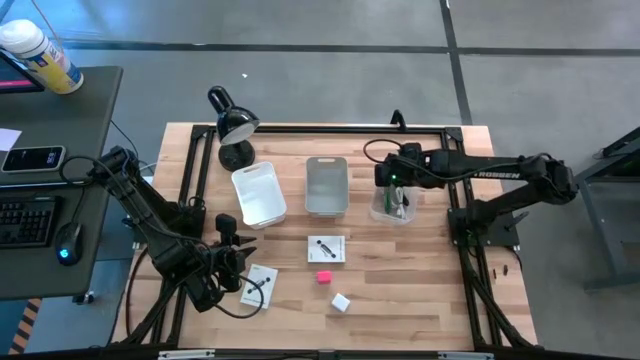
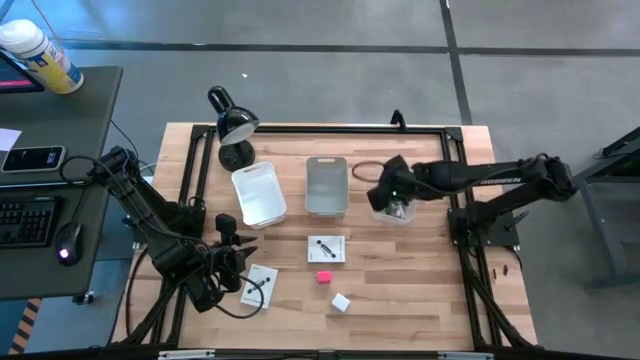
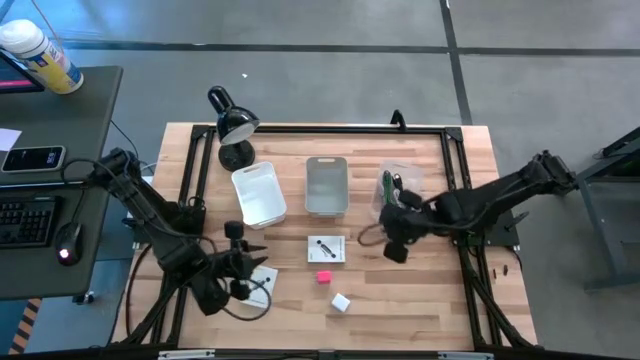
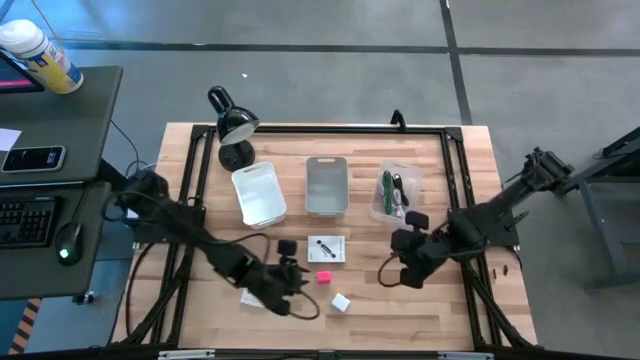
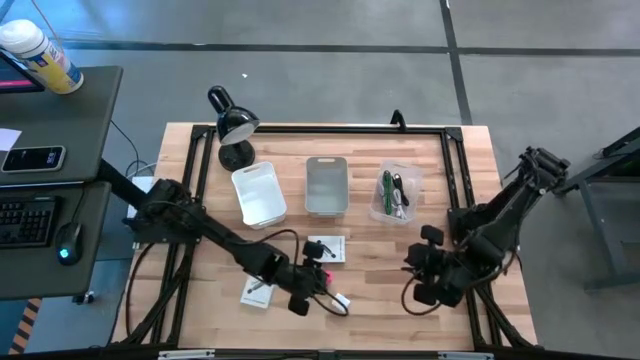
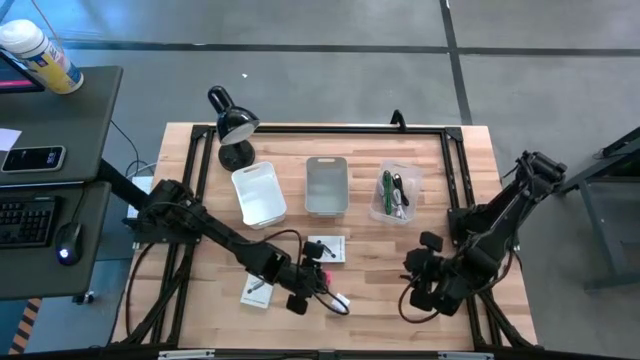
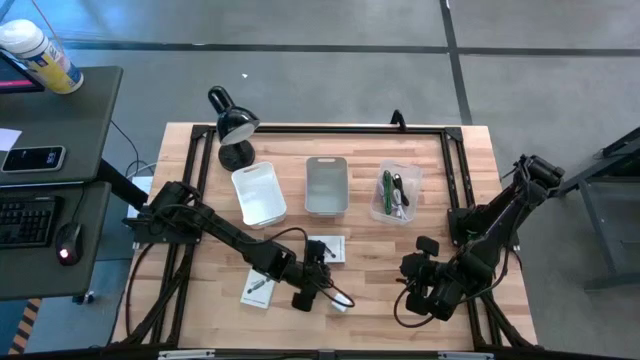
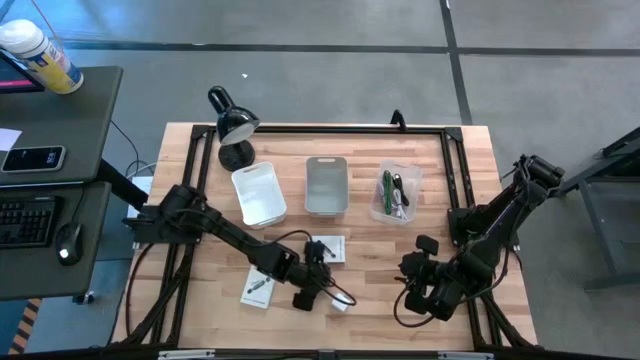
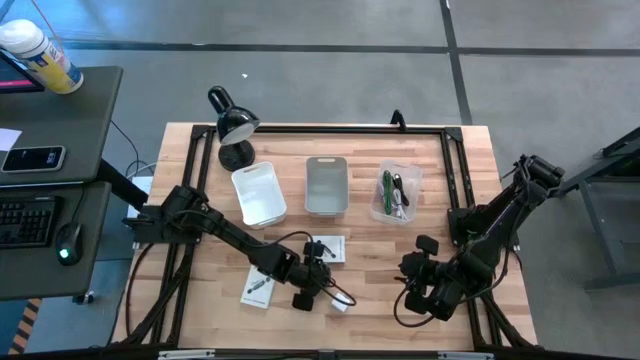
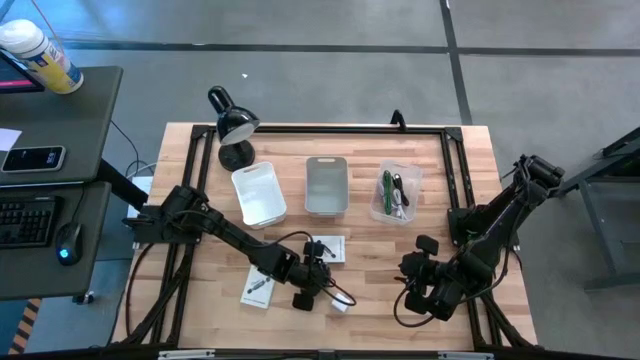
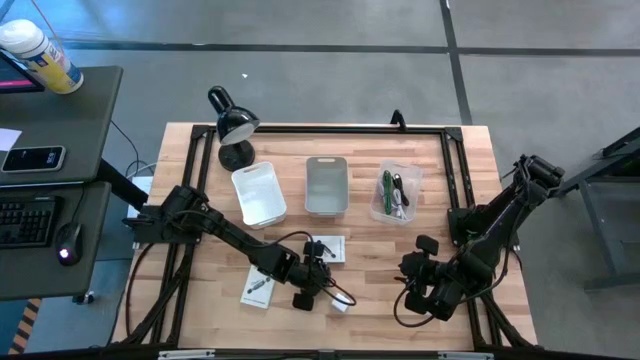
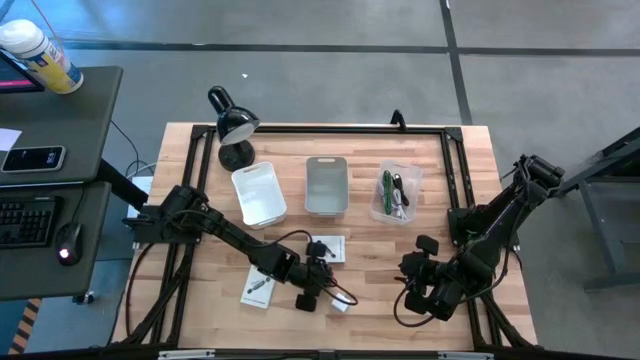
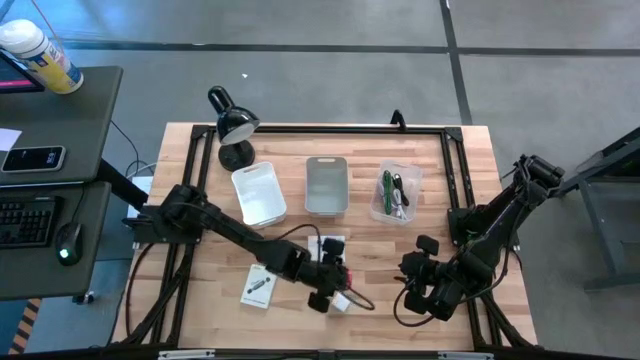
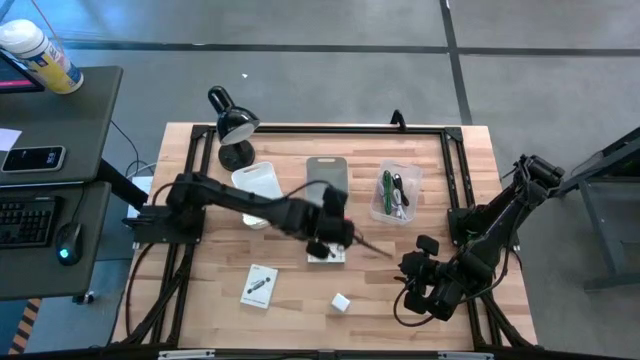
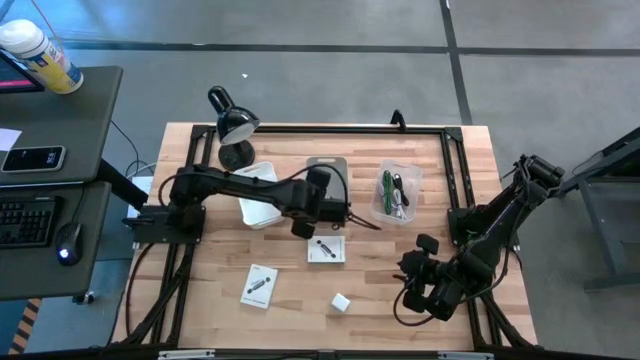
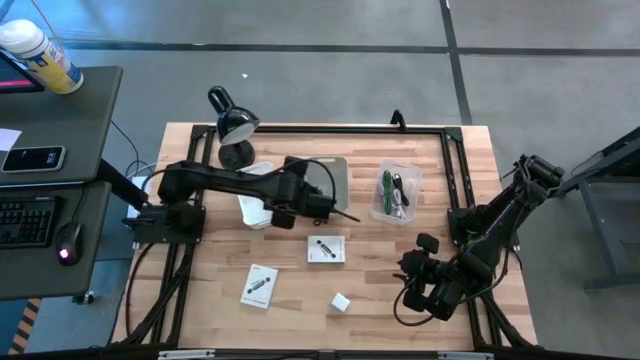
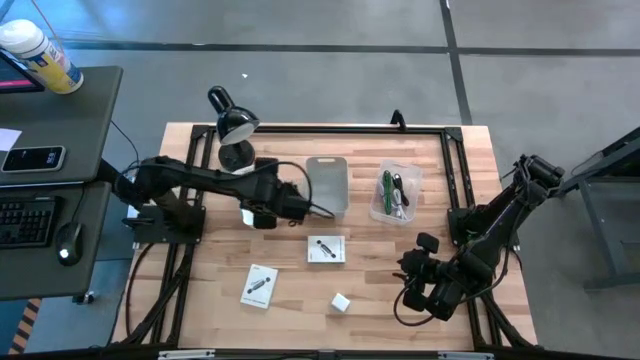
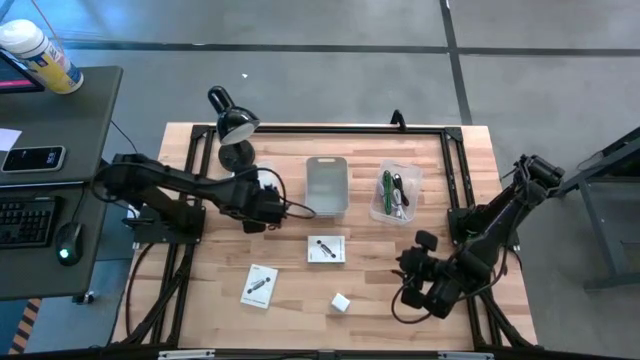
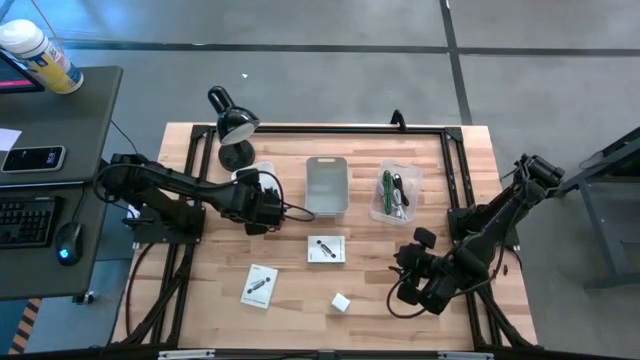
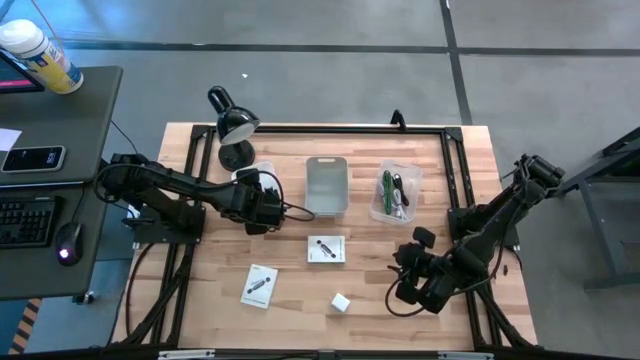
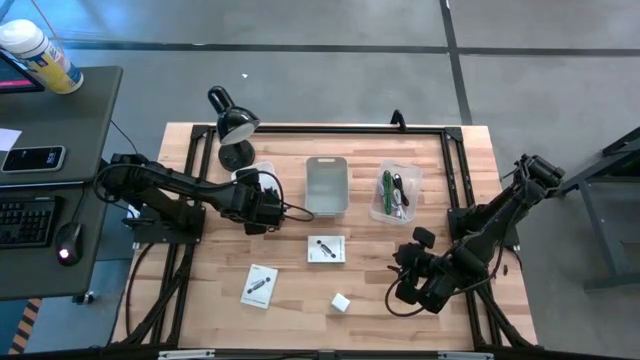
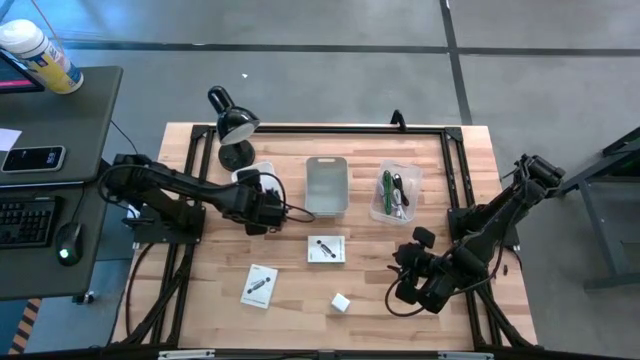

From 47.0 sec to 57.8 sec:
Task: Pick and place items into bin
Put the pink charger adapter into the white bin

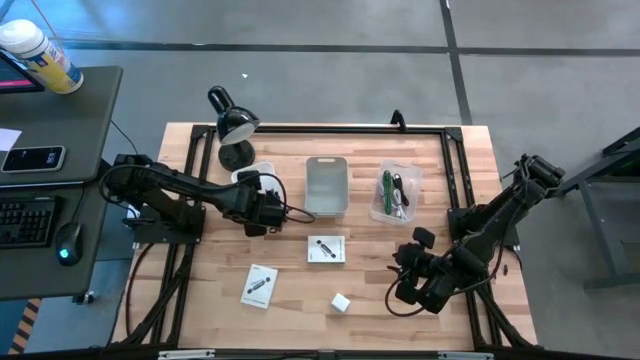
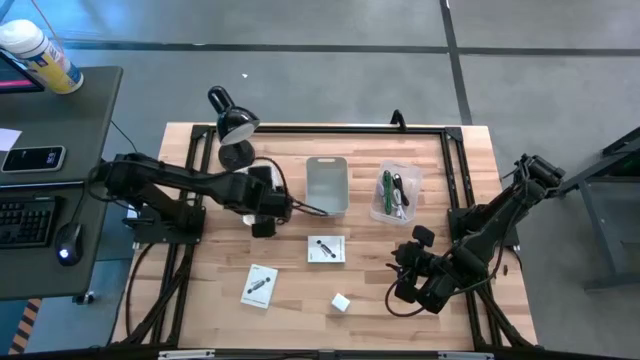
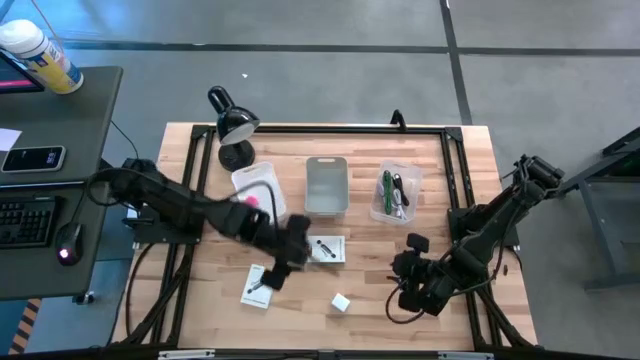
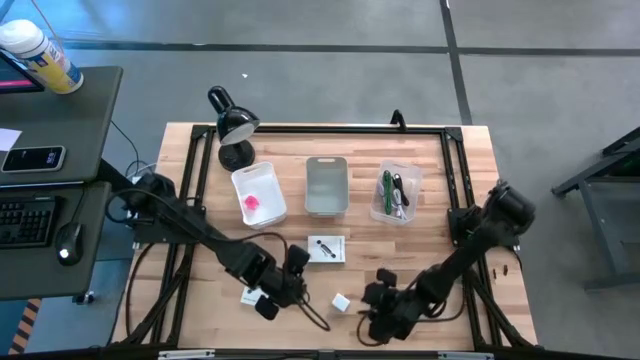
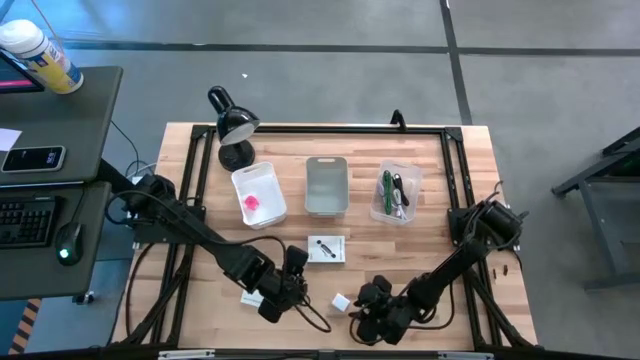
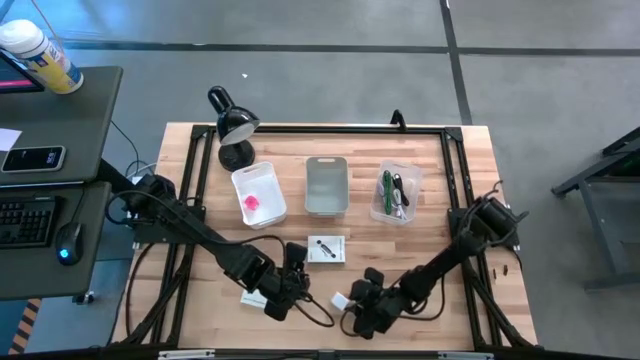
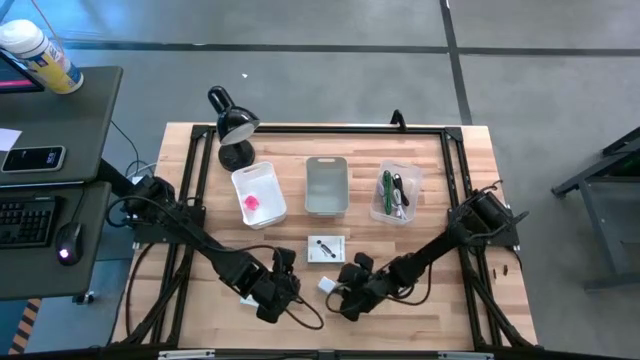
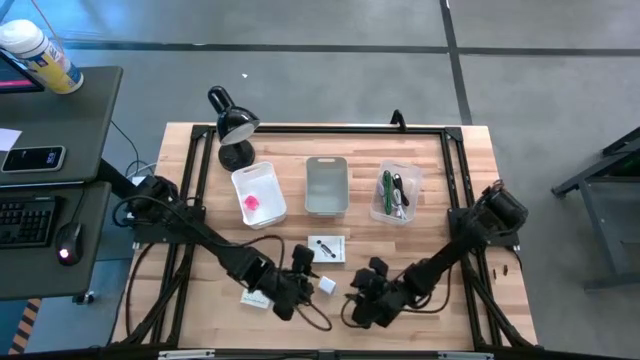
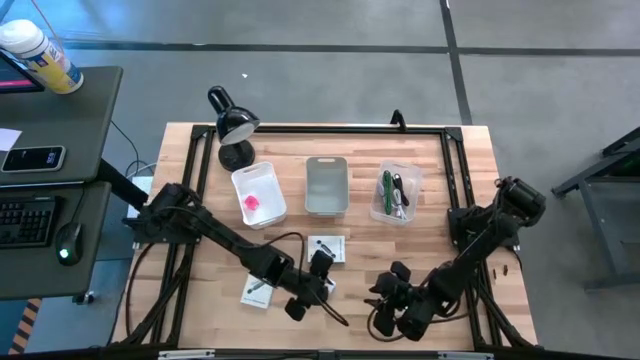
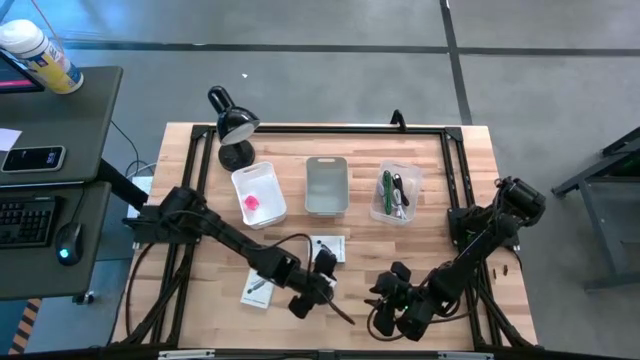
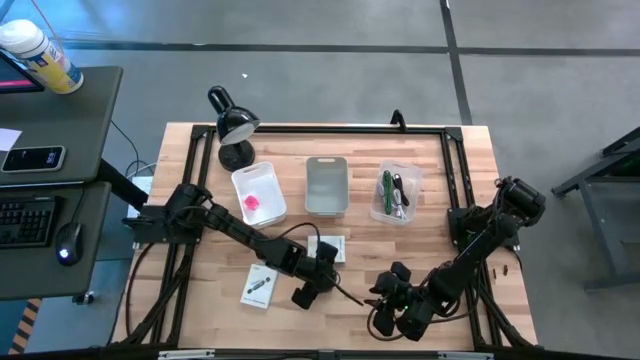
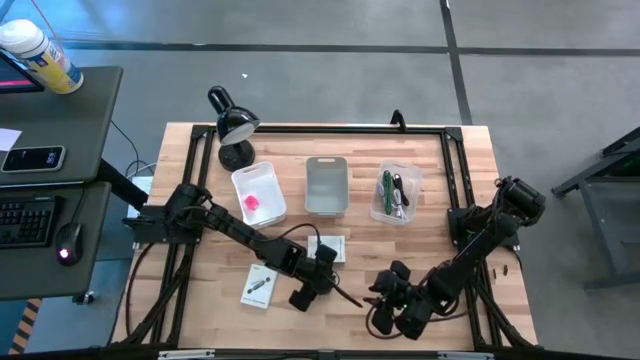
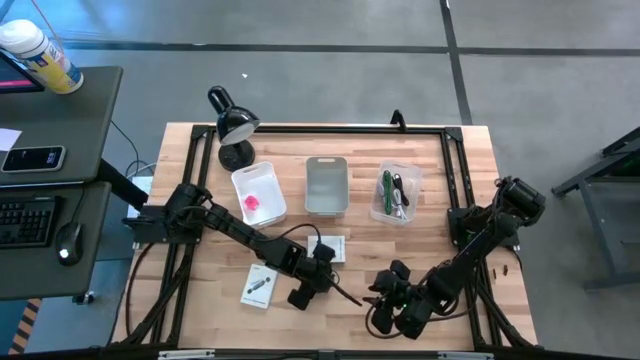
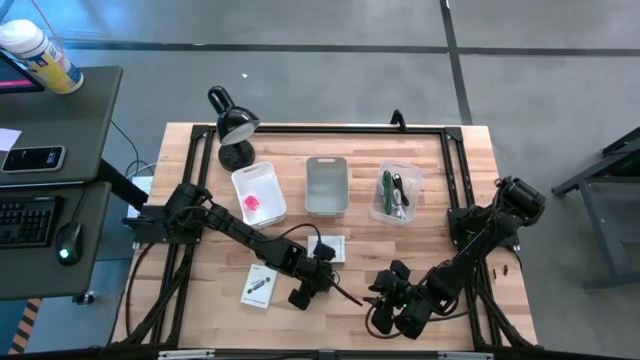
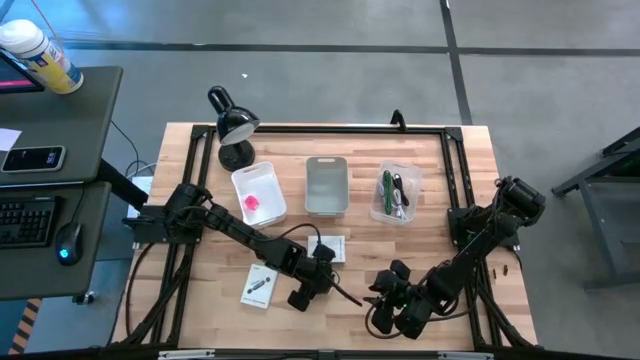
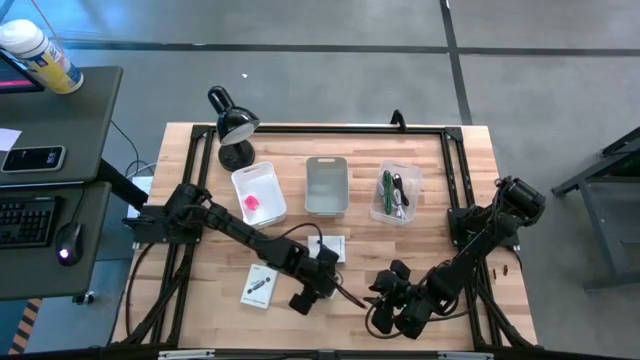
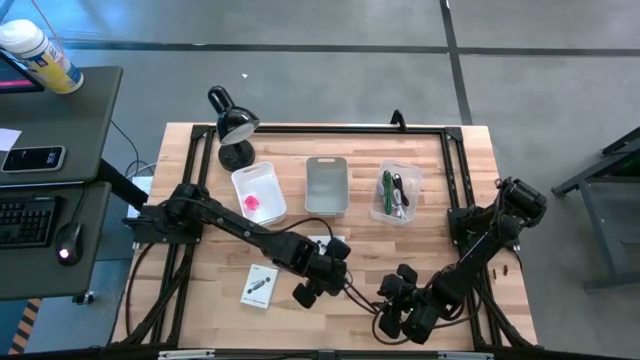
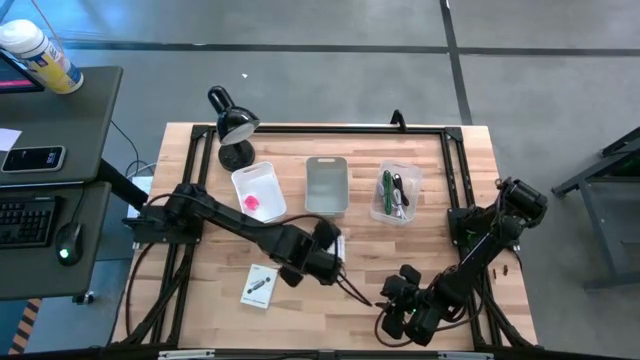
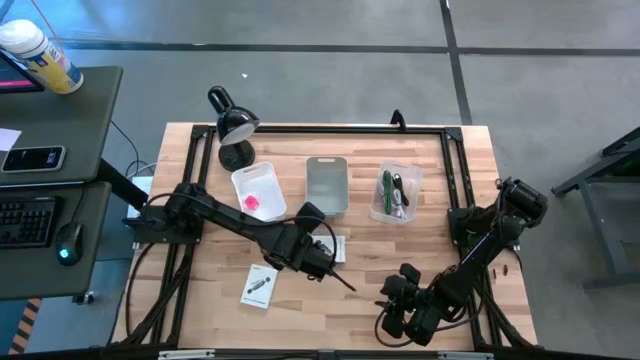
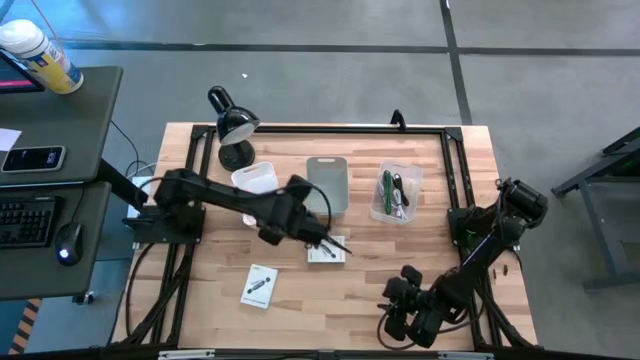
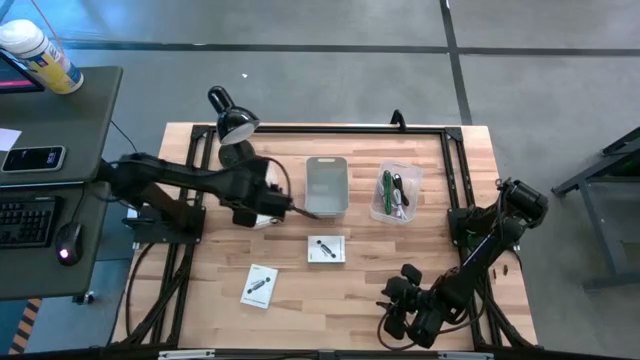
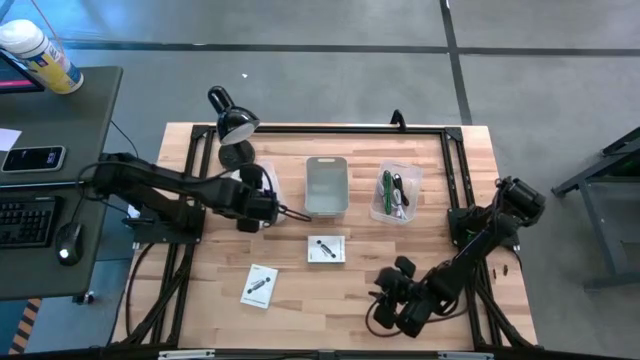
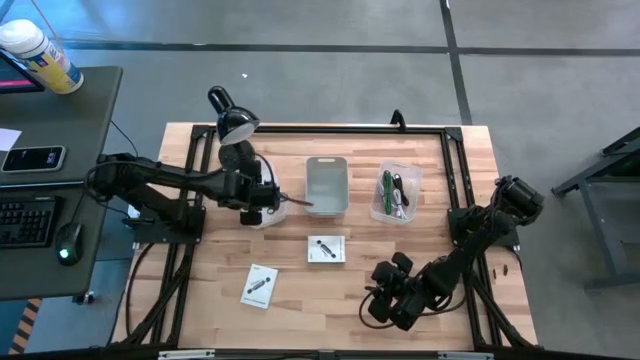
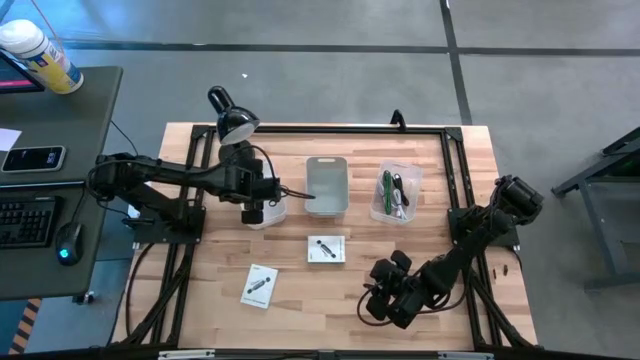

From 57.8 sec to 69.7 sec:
Put the white charger adapter into the white bin
